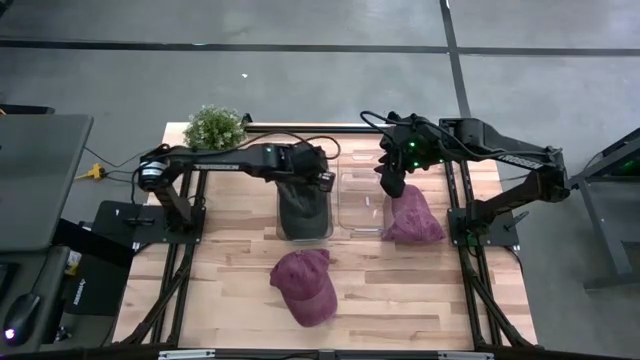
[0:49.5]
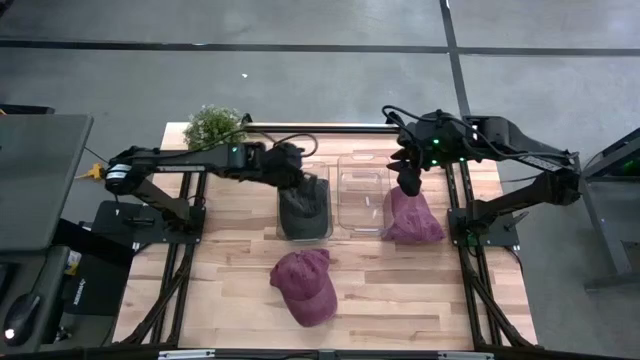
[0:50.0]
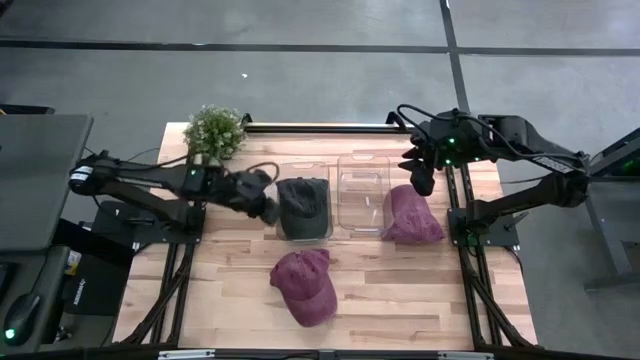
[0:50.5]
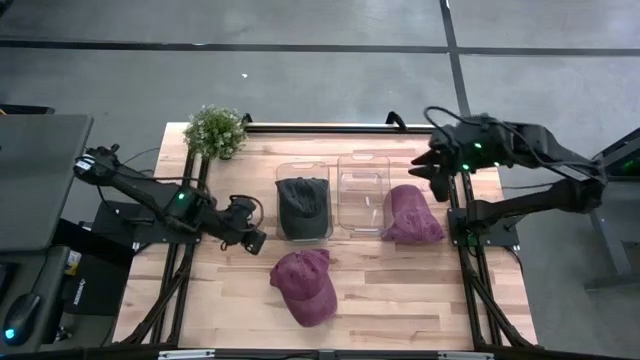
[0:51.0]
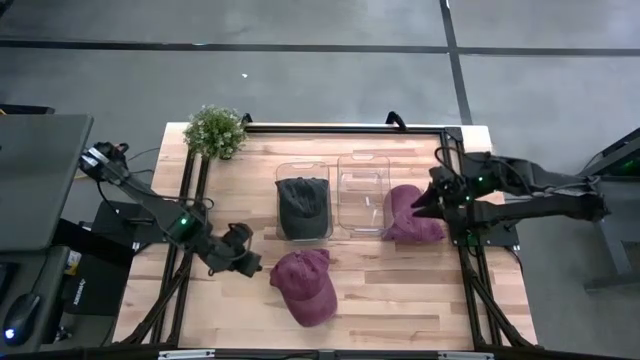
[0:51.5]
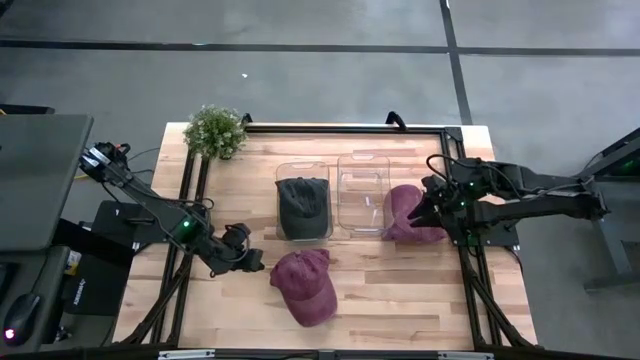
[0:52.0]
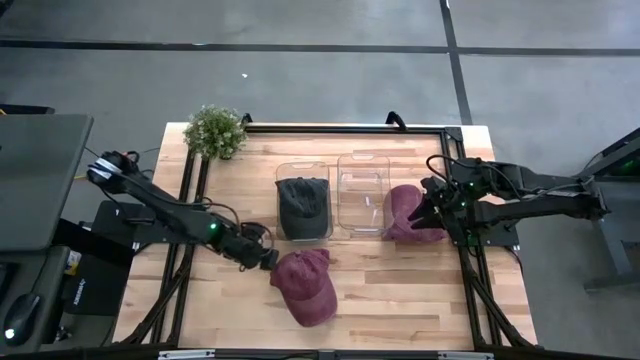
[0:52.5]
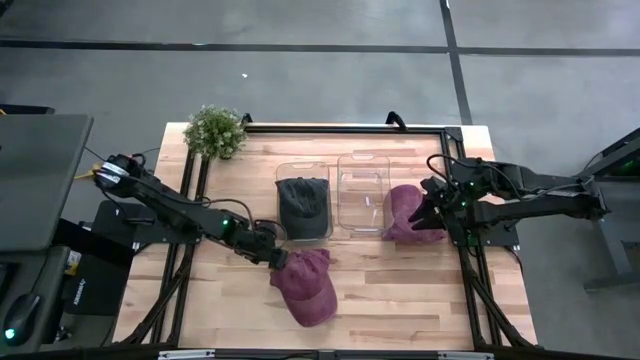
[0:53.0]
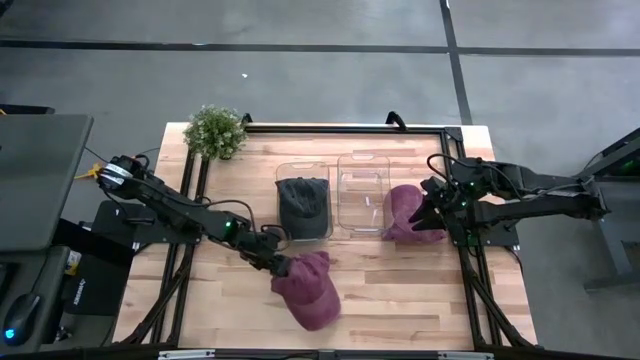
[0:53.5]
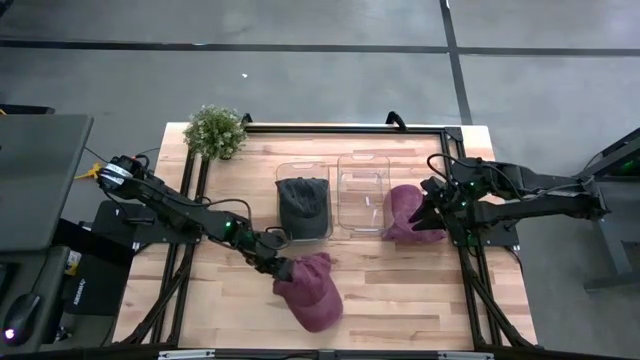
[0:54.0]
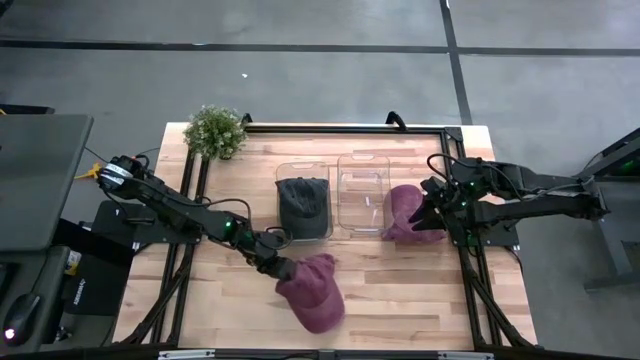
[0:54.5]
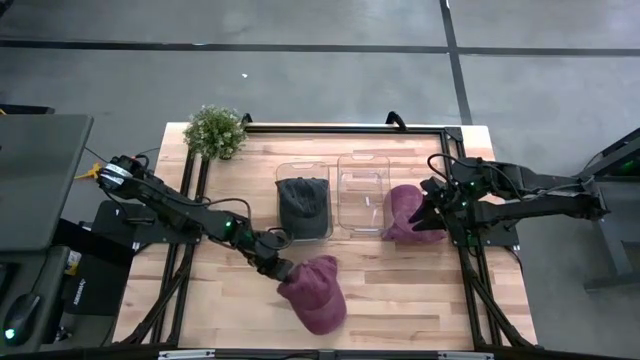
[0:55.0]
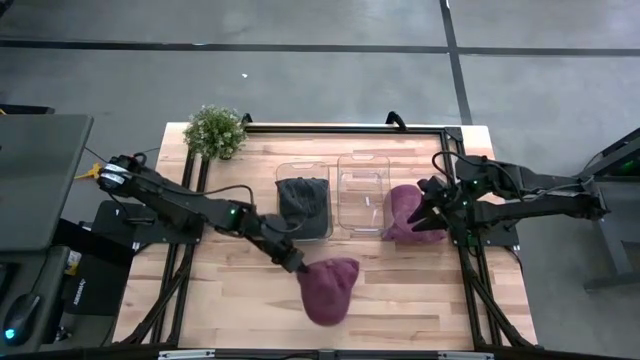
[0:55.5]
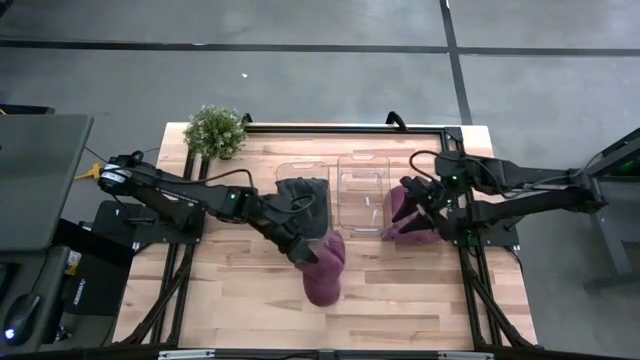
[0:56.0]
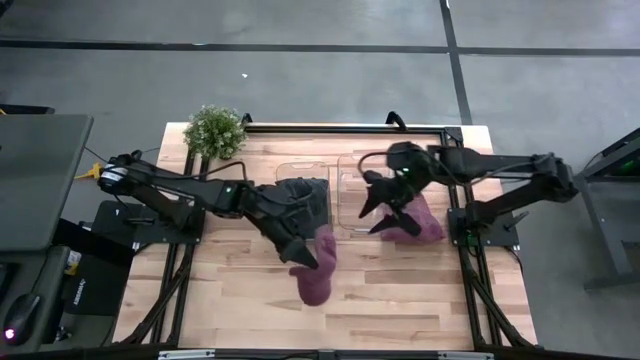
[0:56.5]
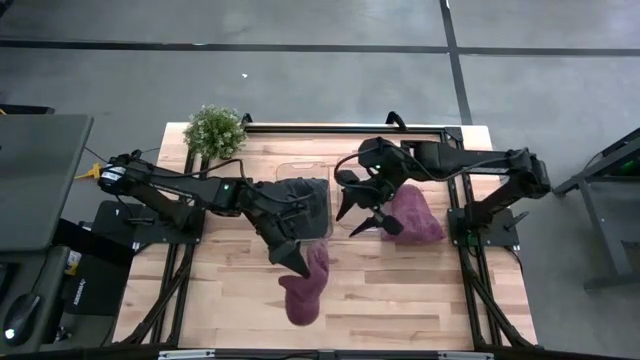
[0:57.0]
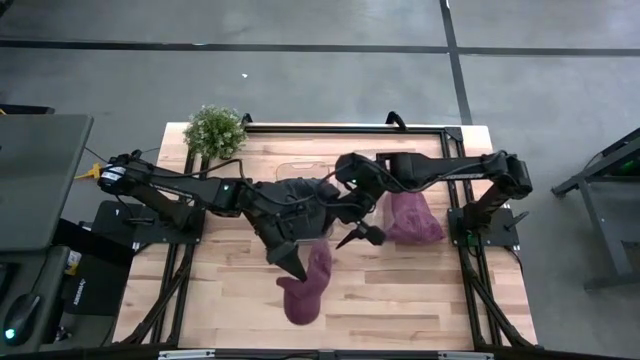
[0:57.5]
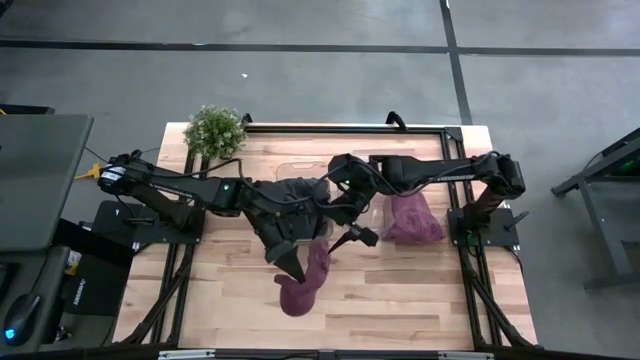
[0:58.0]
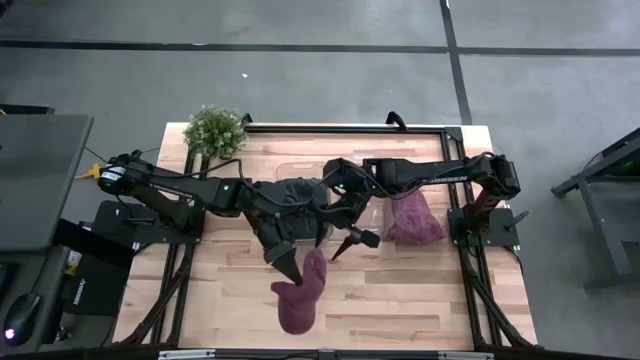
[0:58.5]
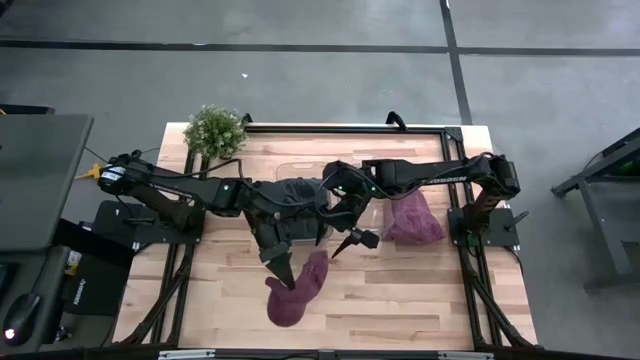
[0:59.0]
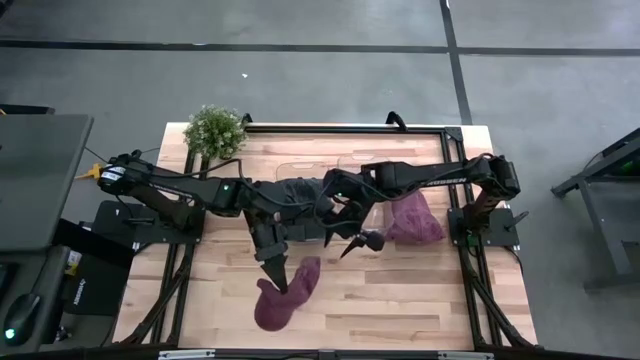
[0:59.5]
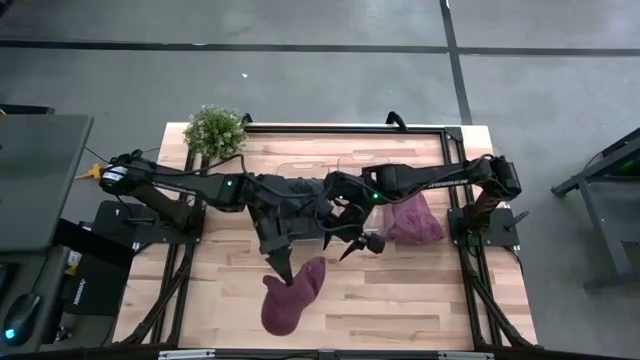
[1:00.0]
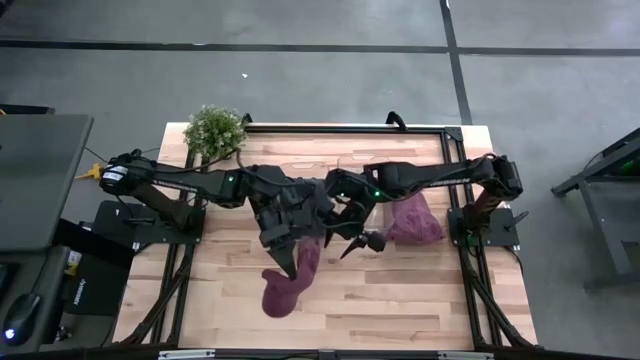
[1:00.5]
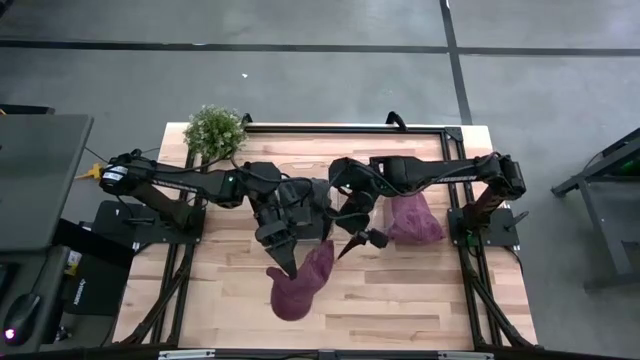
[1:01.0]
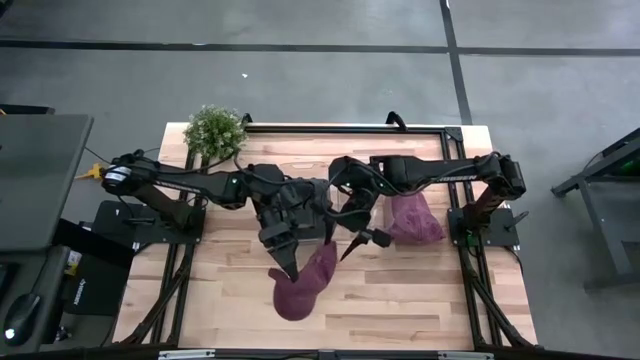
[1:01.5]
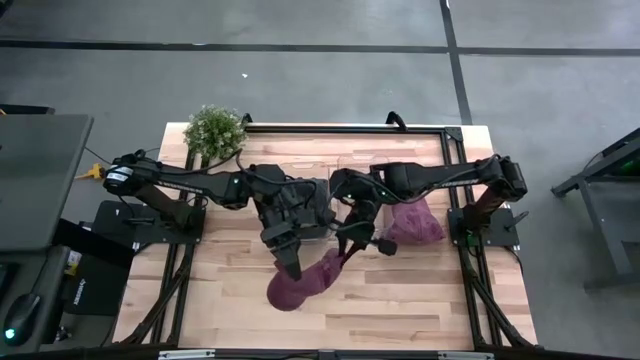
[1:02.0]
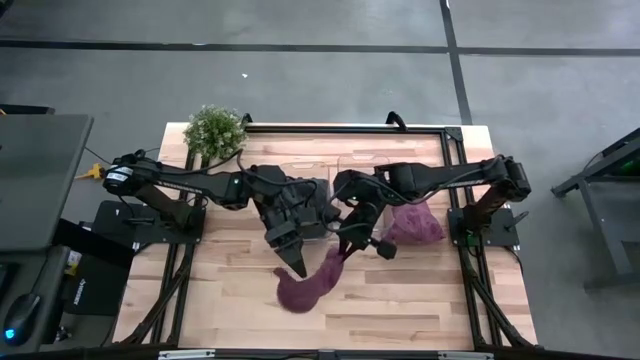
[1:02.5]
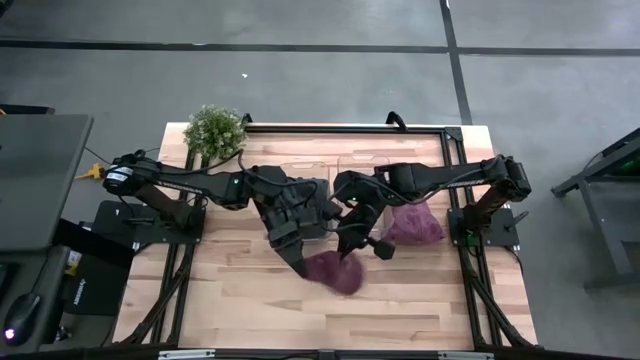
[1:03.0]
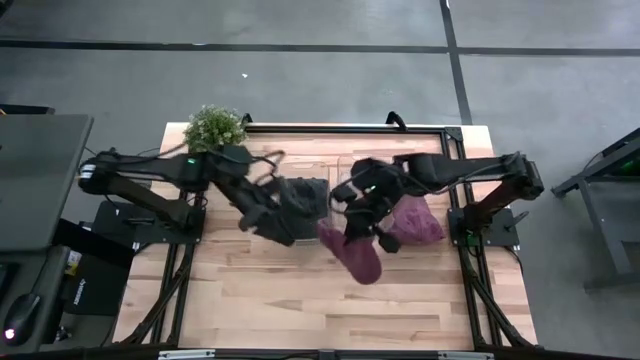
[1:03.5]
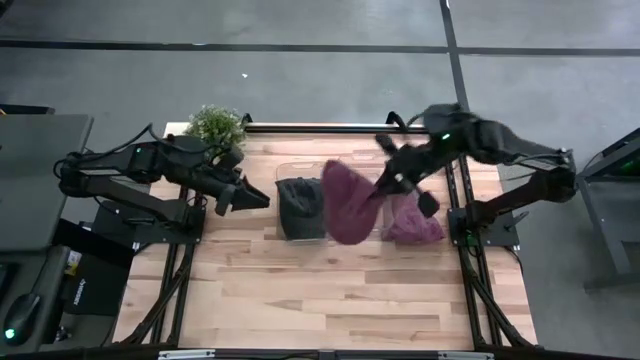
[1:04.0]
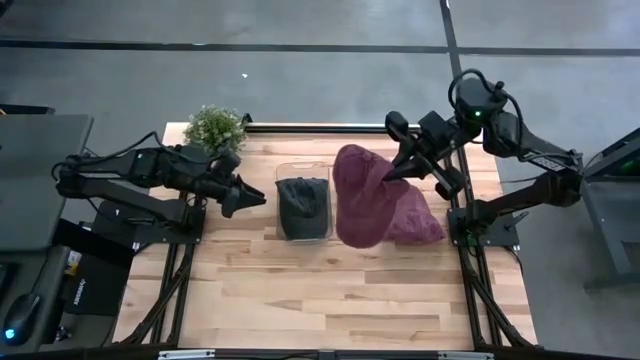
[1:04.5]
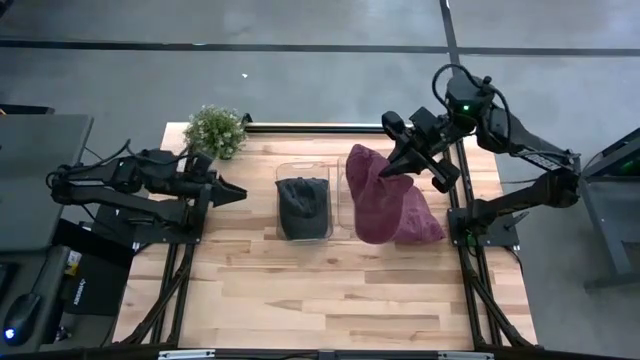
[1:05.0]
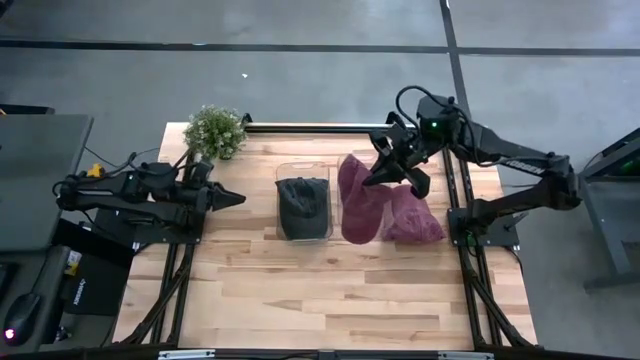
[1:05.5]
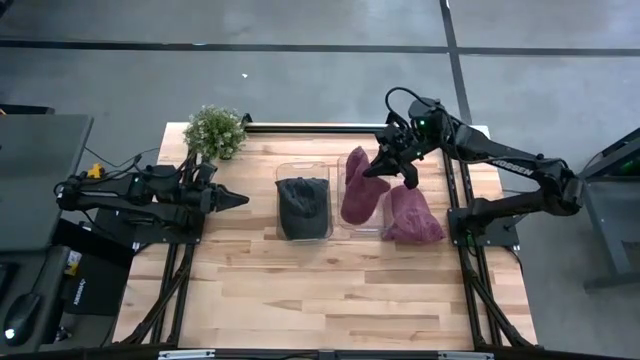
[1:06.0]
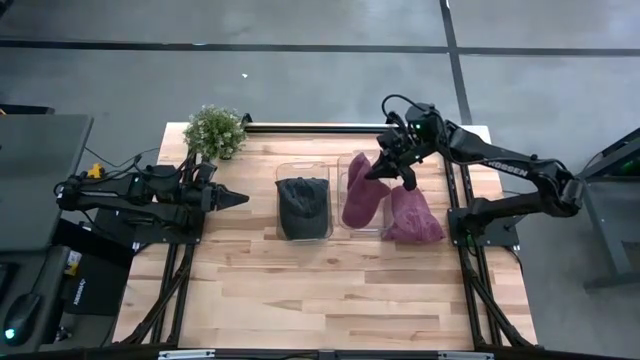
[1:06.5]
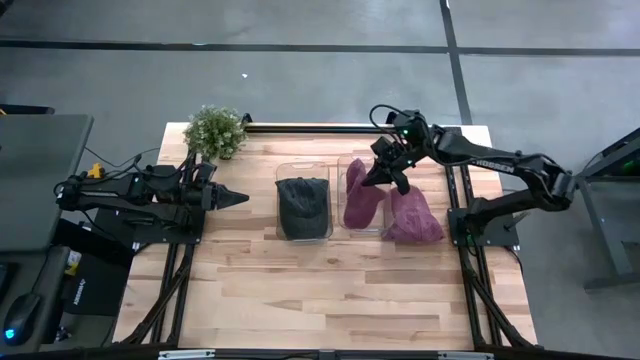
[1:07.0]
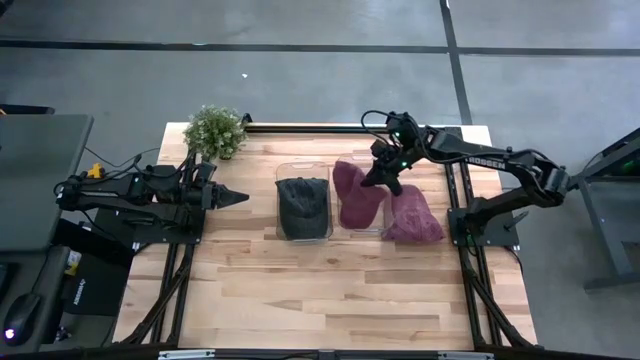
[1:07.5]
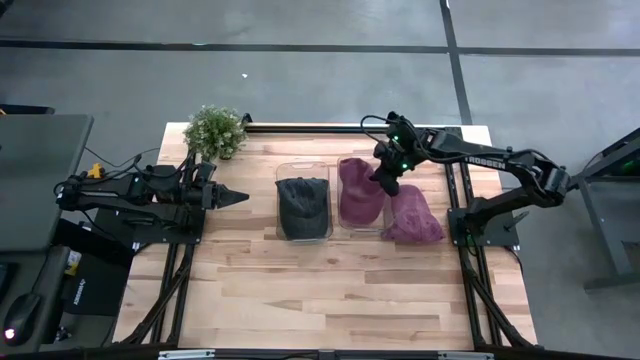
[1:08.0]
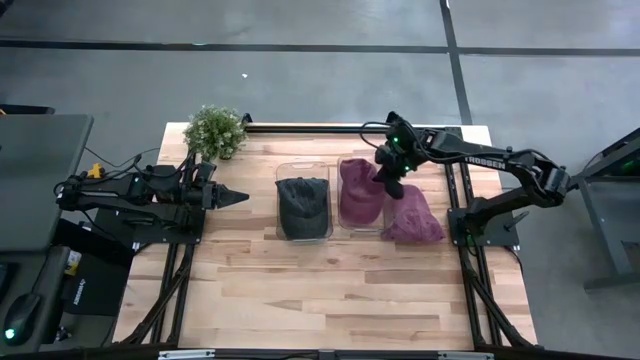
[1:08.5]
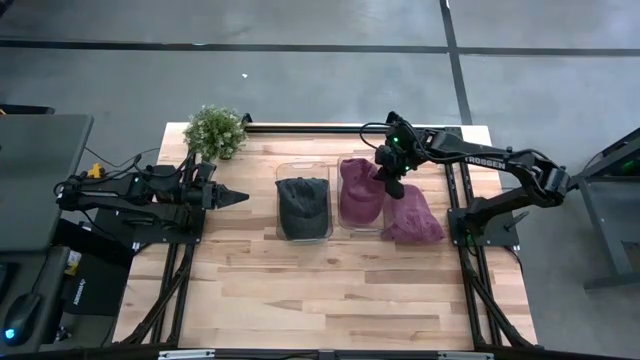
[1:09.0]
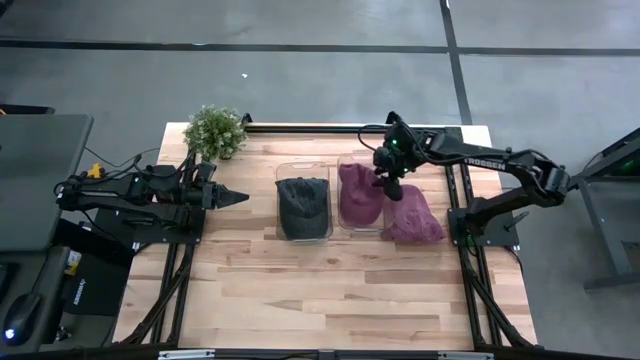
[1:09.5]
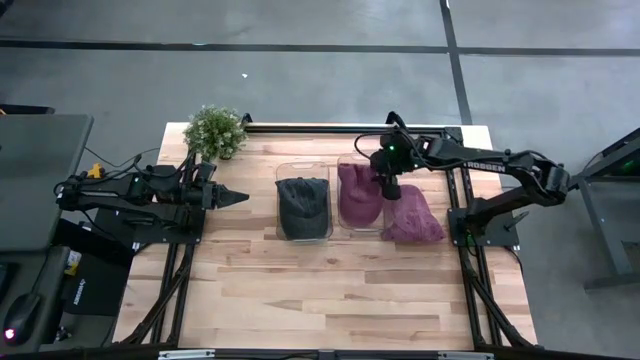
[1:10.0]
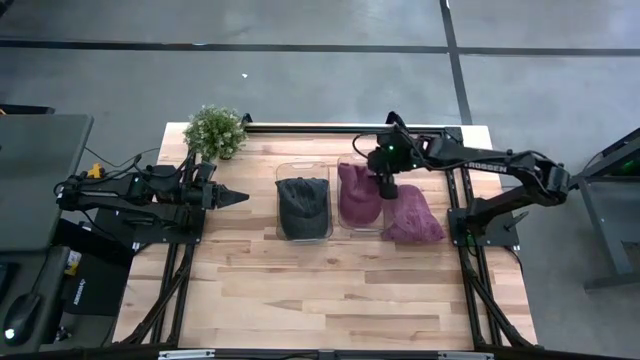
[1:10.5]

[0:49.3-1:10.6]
Task: Pick & Place hat
Put the bottom red cap into the right transparent bin
